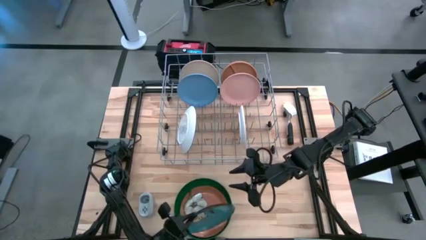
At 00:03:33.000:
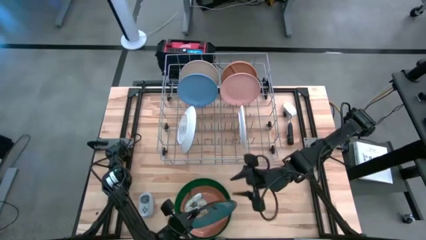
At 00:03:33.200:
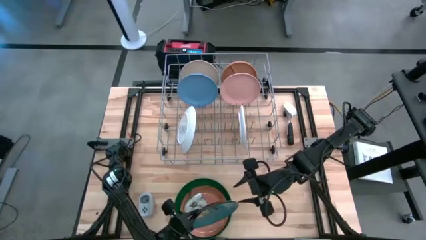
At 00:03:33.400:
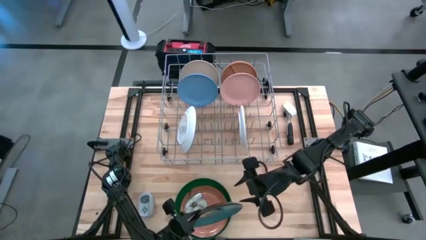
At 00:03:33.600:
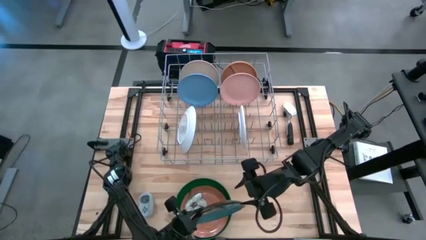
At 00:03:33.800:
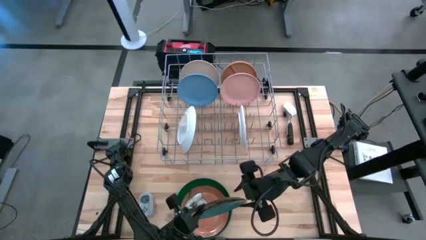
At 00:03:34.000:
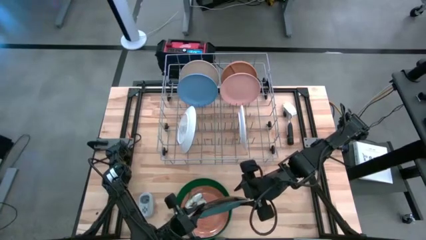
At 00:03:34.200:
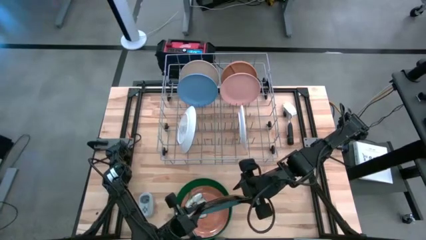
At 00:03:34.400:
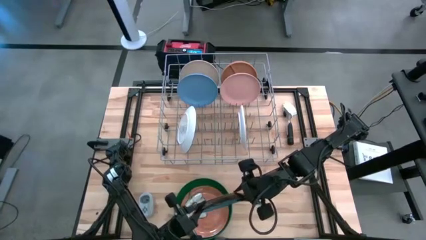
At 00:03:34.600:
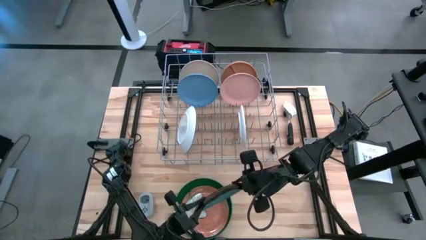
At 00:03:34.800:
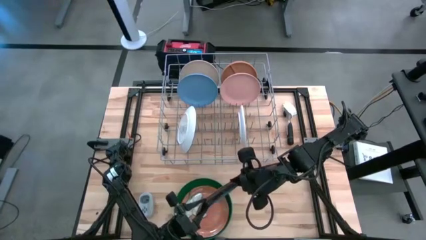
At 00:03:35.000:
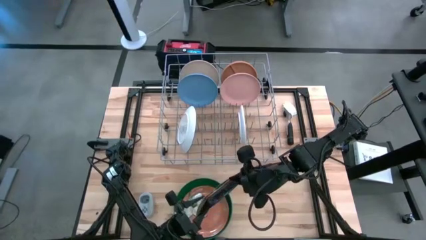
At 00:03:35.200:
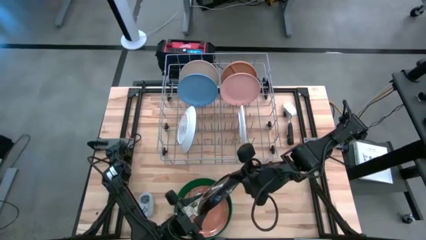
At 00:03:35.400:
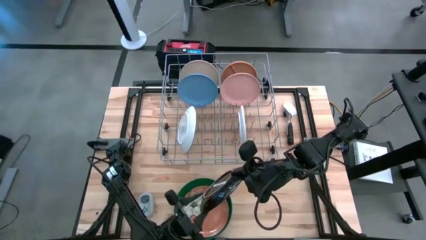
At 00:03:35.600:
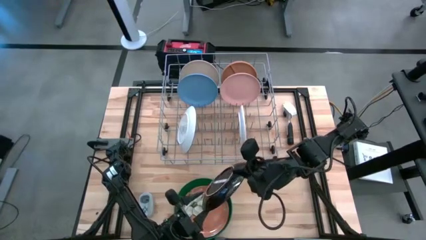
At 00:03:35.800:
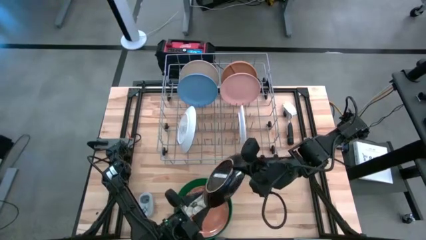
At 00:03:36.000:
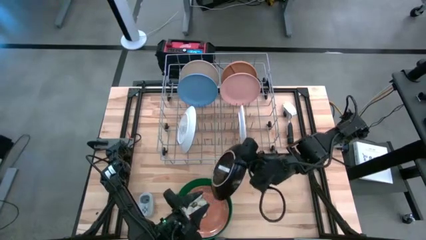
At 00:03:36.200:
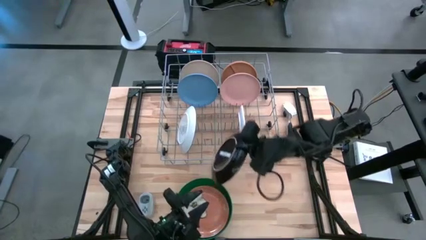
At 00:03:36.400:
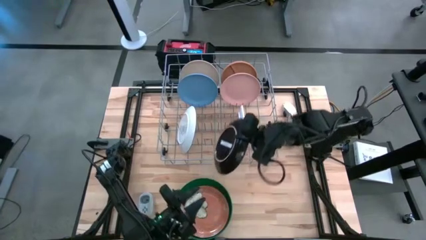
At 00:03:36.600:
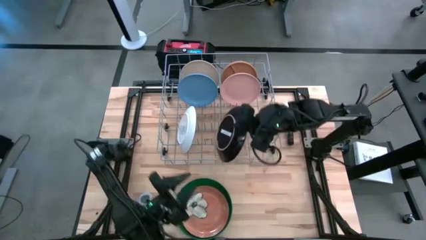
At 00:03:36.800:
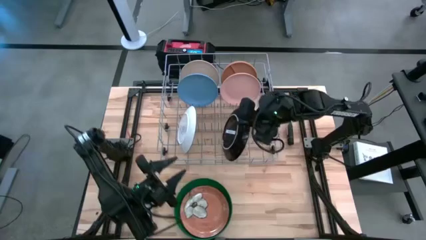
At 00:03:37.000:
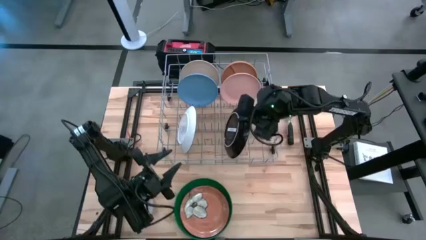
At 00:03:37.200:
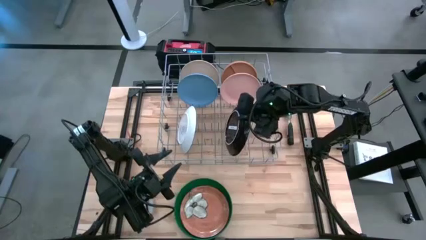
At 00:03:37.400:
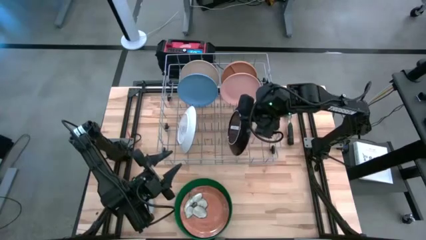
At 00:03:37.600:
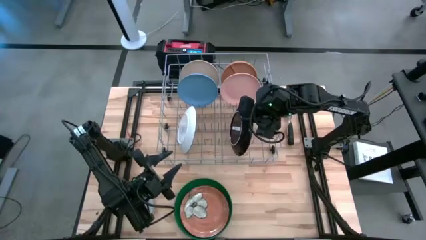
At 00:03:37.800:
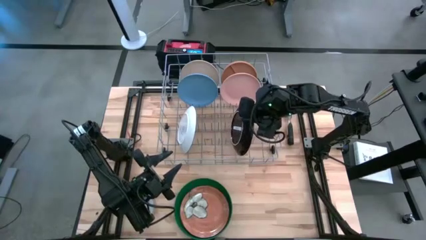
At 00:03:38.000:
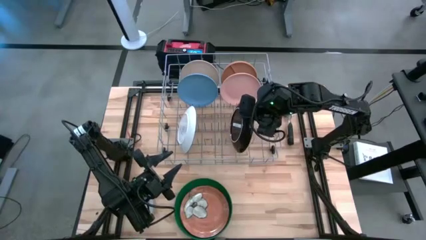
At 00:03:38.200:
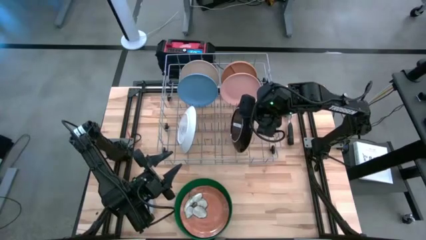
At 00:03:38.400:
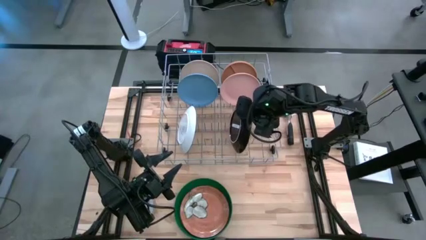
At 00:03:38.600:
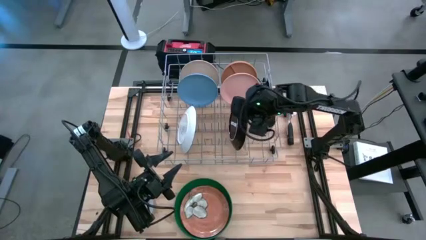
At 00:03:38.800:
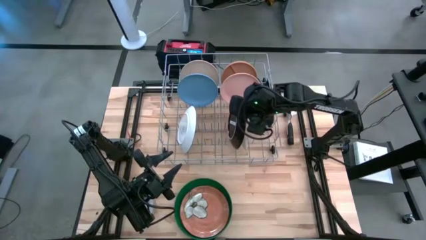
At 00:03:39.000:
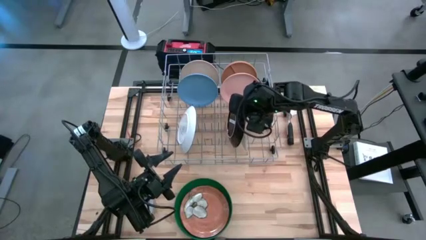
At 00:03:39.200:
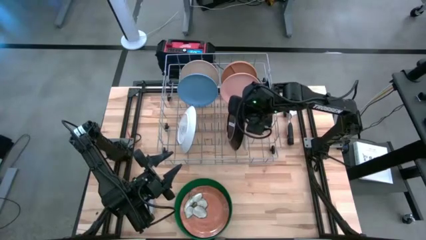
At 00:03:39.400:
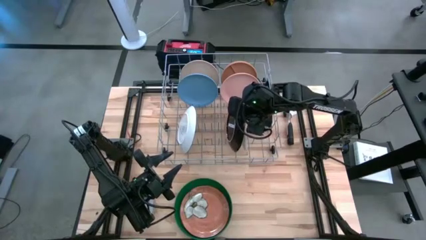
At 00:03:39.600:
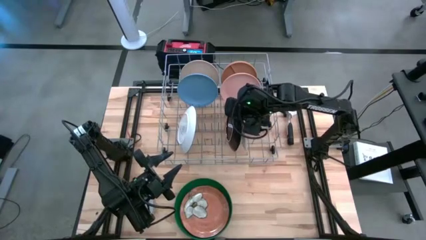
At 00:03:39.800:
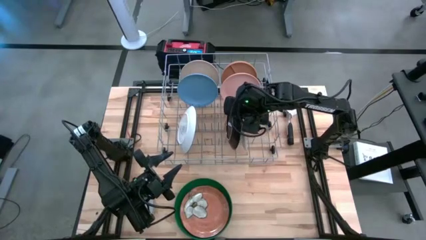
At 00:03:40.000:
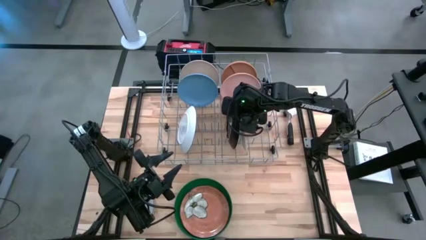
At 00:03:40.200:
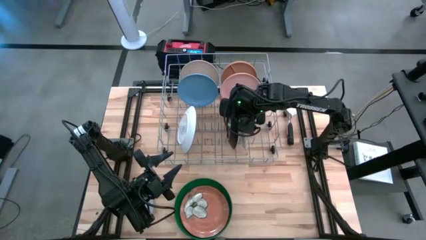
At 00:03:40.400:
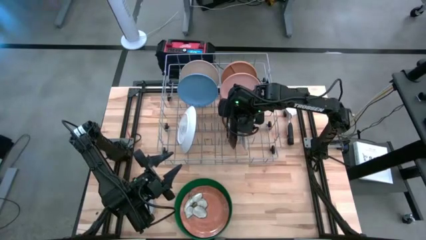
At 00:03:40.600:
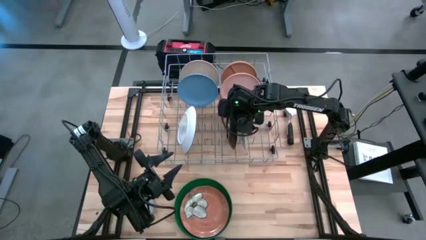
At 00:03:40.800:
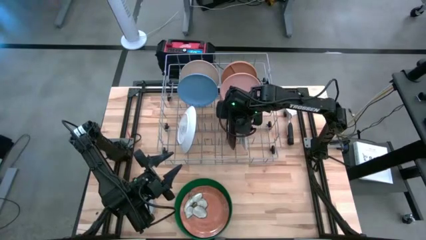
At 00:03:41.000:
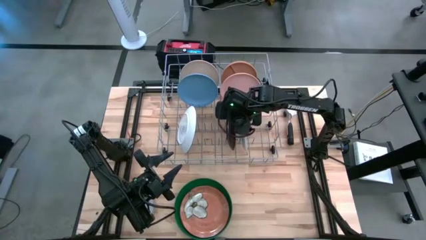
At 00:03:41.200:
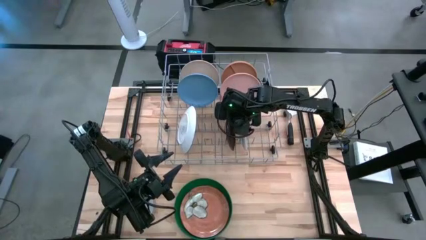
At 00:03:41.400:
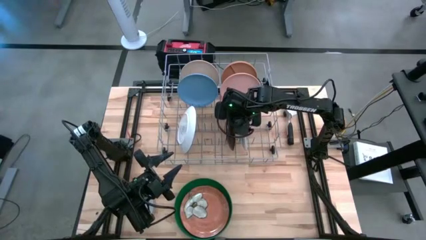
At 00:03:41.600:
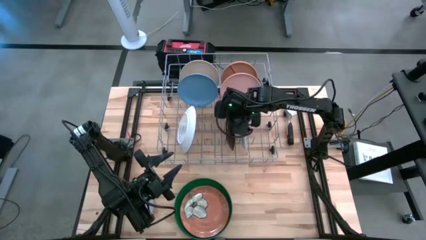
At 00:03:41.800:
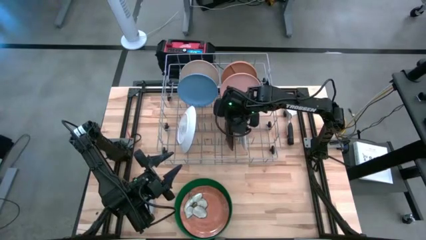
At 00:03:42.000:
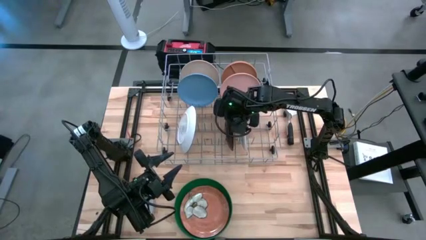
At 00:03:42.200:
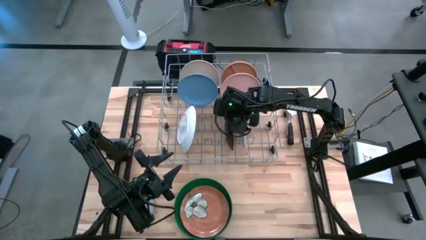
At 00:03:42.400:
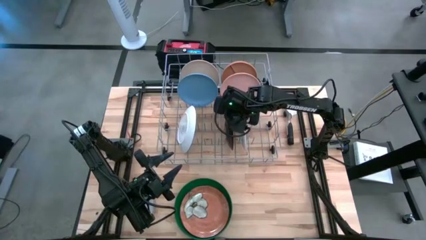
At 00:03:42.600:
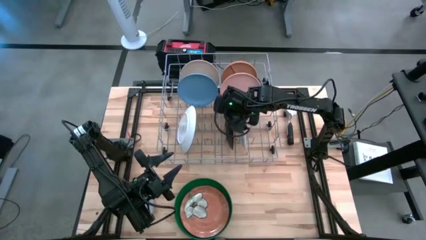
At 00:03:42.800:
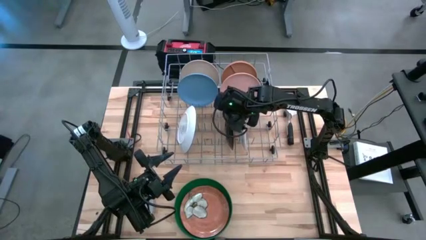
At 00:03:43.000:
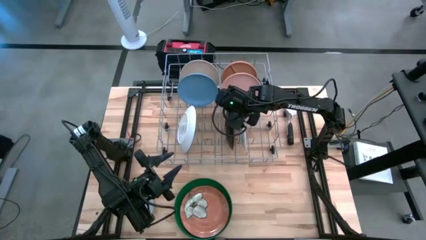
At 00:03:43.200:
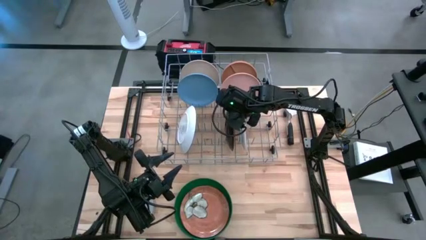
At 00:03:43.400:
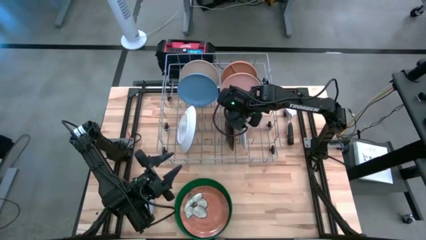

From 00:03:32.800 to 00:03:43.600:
Task: Sort dishes
Put the blue flower patterned plate into the dish rack
